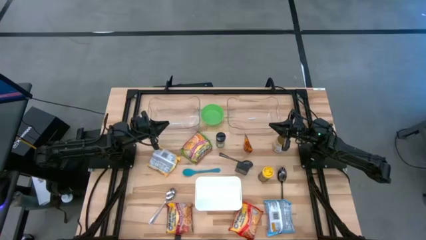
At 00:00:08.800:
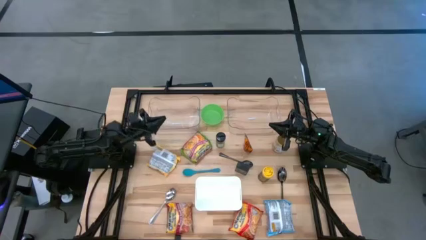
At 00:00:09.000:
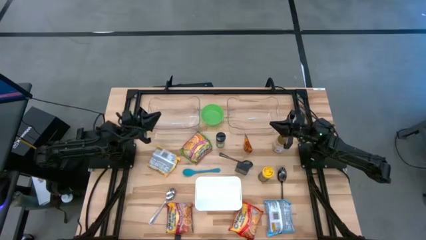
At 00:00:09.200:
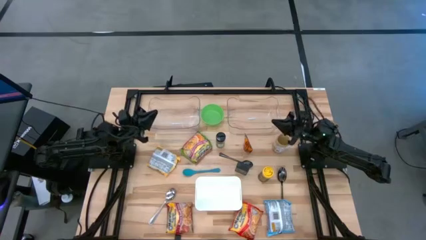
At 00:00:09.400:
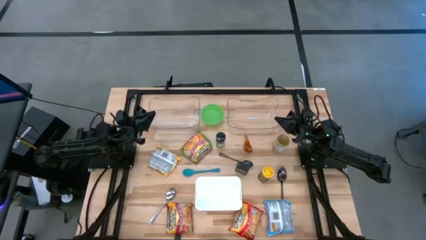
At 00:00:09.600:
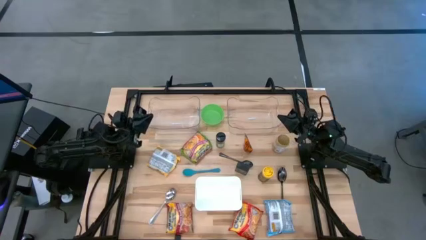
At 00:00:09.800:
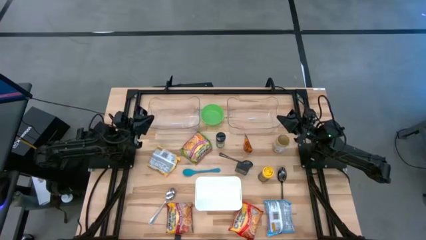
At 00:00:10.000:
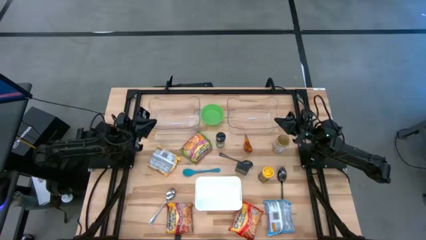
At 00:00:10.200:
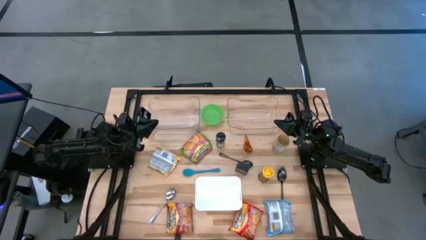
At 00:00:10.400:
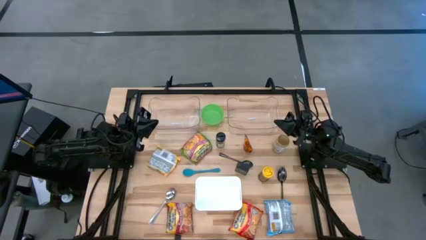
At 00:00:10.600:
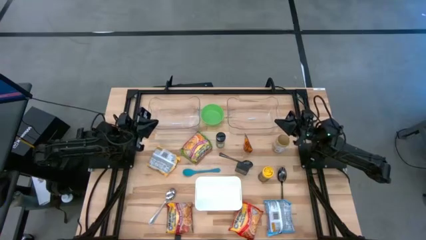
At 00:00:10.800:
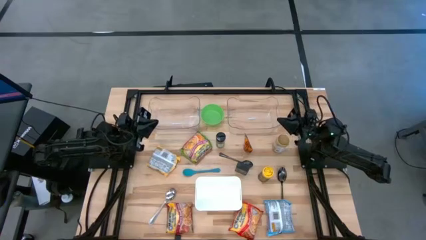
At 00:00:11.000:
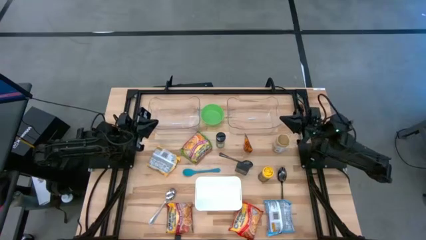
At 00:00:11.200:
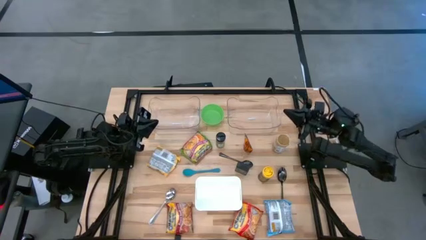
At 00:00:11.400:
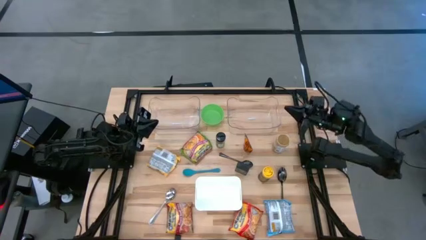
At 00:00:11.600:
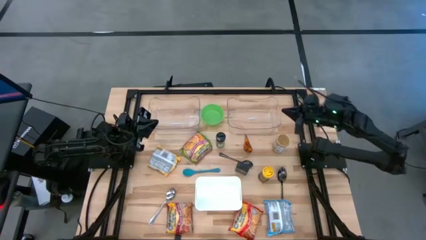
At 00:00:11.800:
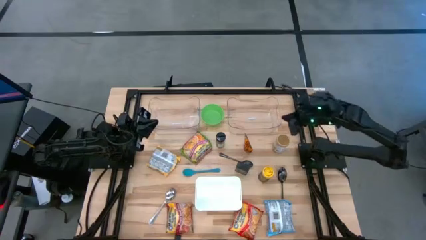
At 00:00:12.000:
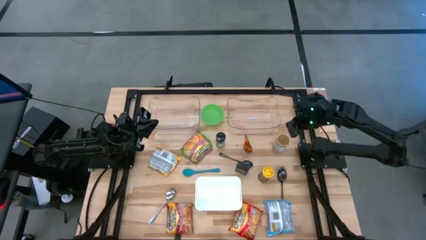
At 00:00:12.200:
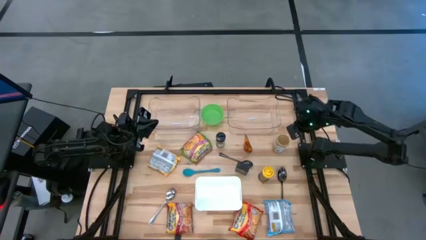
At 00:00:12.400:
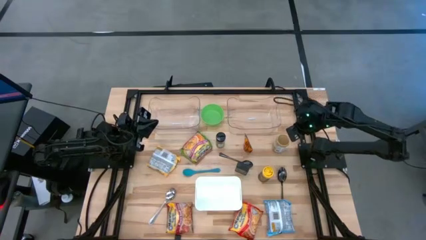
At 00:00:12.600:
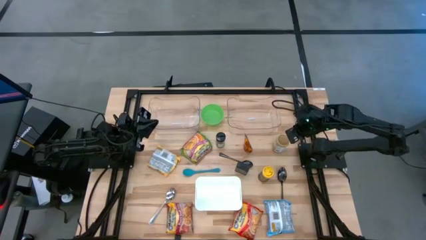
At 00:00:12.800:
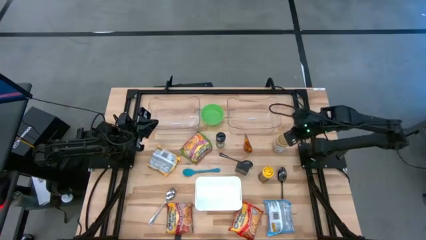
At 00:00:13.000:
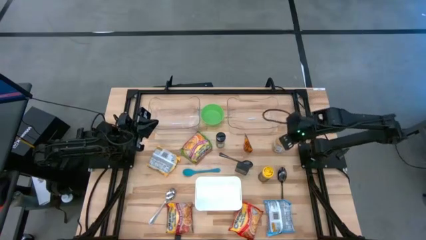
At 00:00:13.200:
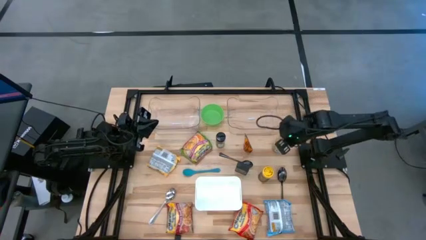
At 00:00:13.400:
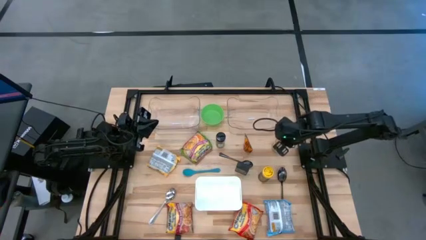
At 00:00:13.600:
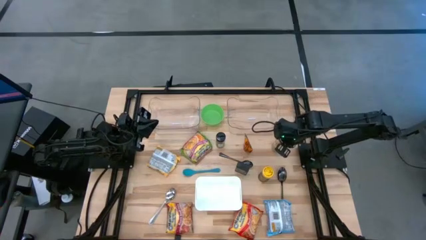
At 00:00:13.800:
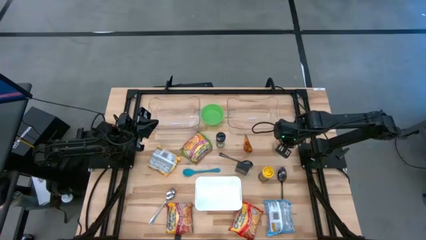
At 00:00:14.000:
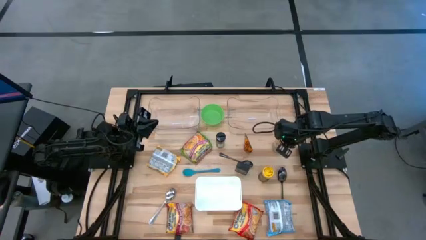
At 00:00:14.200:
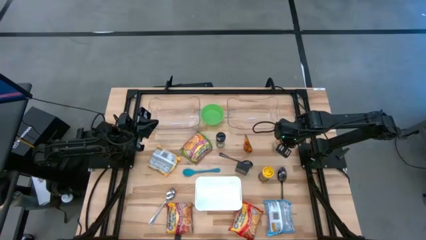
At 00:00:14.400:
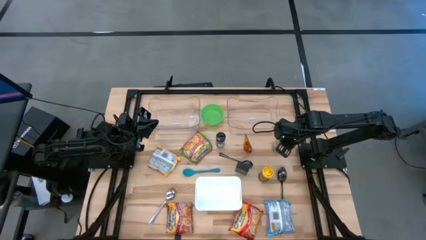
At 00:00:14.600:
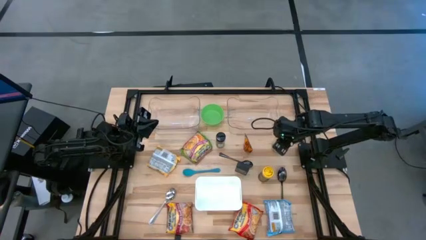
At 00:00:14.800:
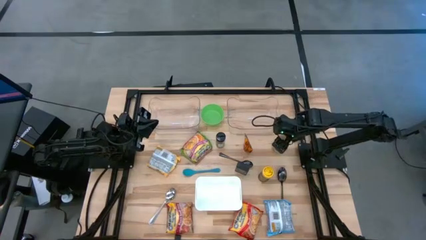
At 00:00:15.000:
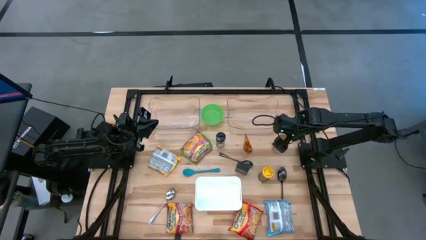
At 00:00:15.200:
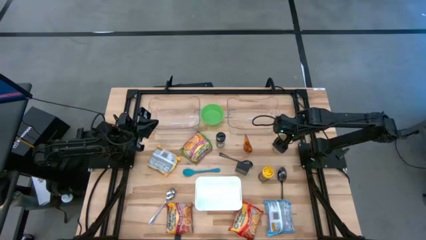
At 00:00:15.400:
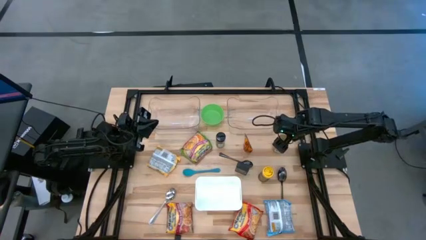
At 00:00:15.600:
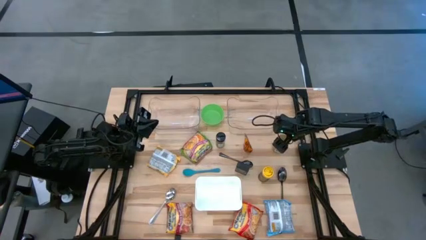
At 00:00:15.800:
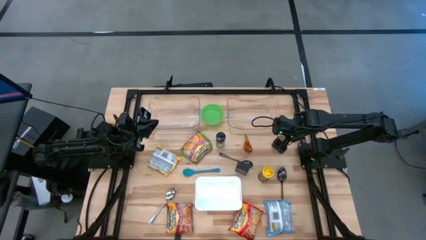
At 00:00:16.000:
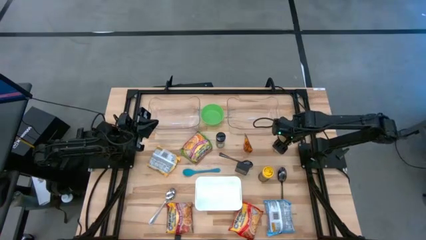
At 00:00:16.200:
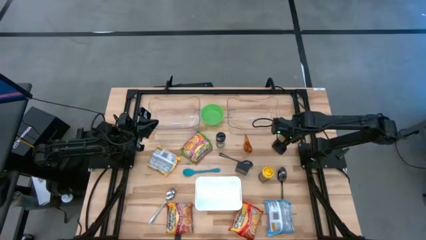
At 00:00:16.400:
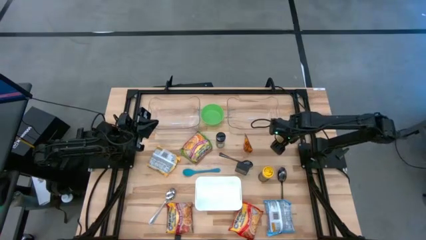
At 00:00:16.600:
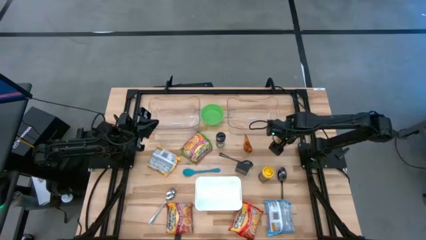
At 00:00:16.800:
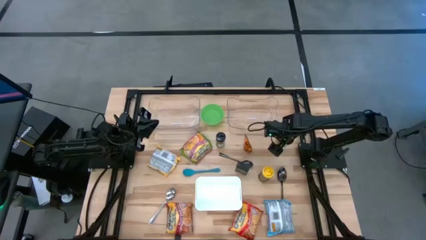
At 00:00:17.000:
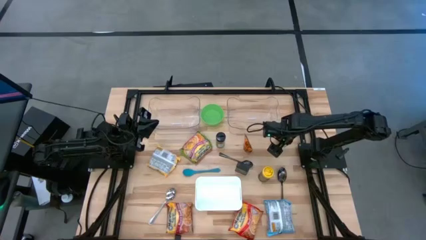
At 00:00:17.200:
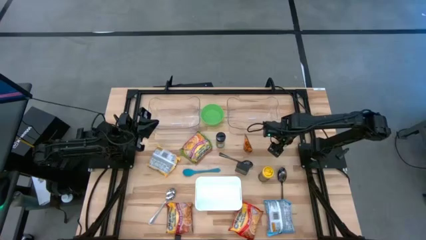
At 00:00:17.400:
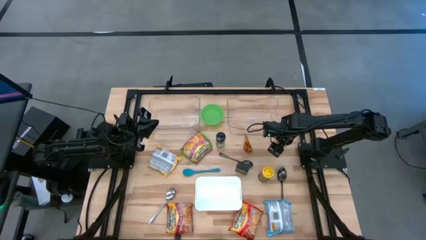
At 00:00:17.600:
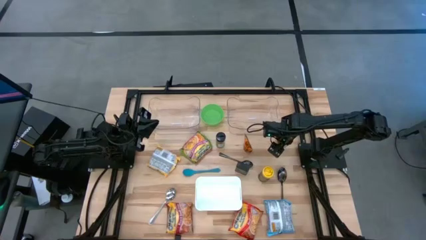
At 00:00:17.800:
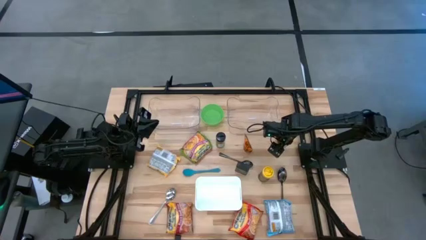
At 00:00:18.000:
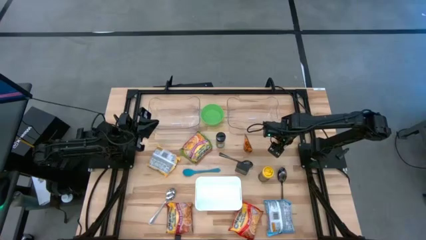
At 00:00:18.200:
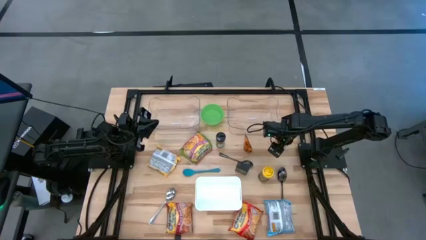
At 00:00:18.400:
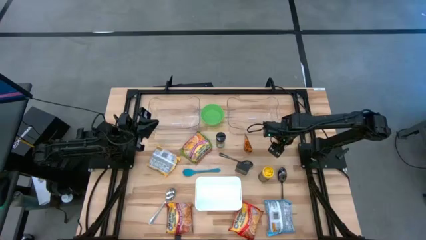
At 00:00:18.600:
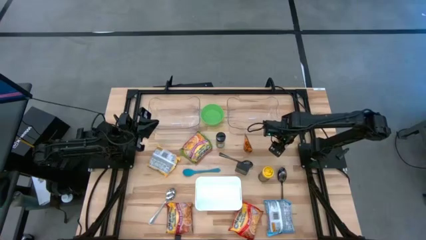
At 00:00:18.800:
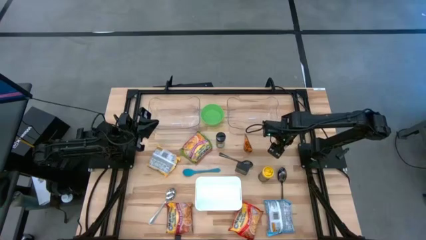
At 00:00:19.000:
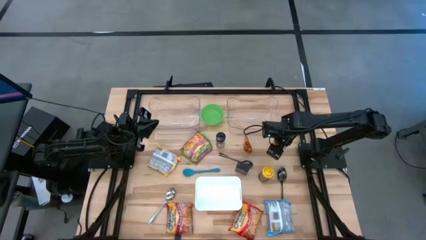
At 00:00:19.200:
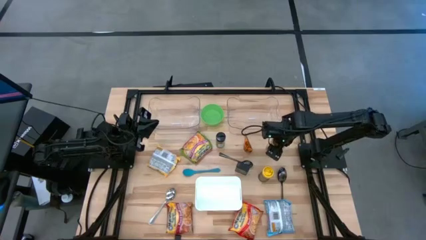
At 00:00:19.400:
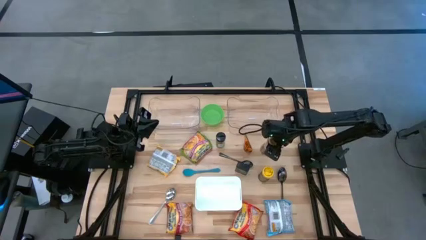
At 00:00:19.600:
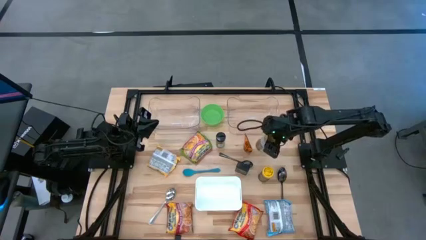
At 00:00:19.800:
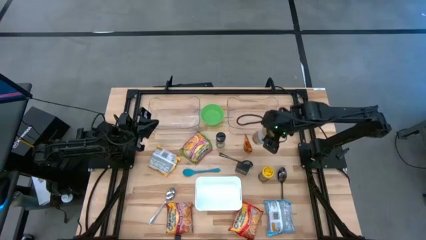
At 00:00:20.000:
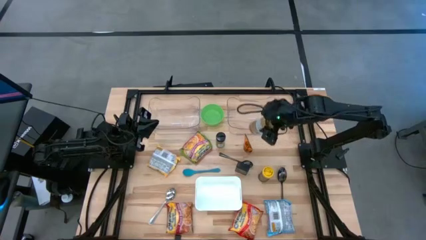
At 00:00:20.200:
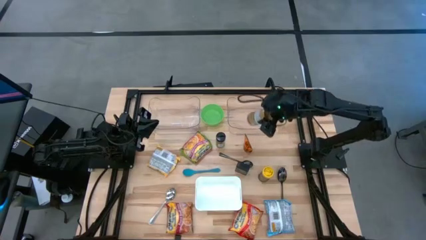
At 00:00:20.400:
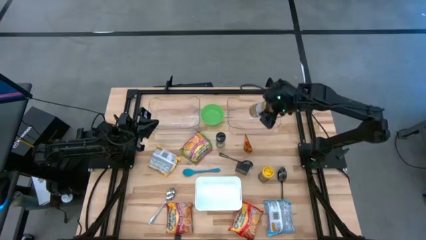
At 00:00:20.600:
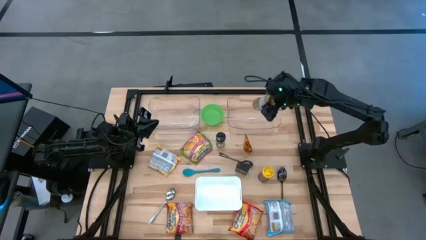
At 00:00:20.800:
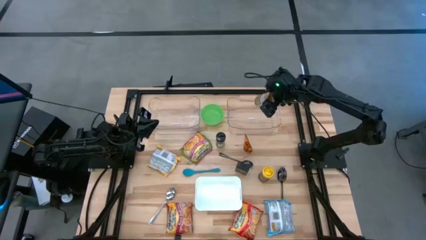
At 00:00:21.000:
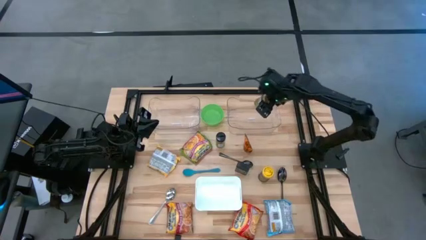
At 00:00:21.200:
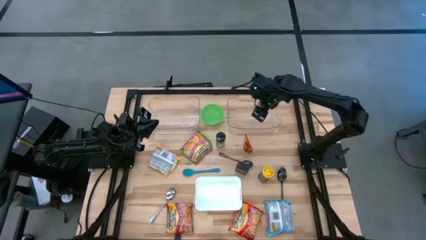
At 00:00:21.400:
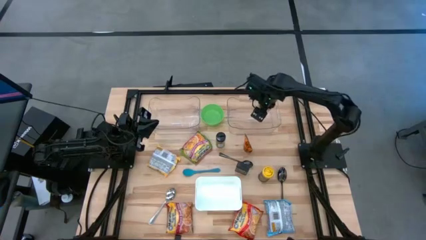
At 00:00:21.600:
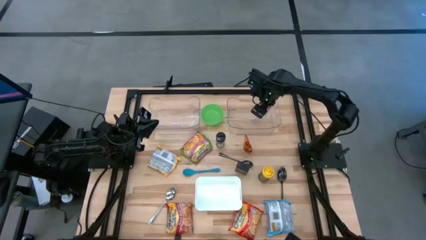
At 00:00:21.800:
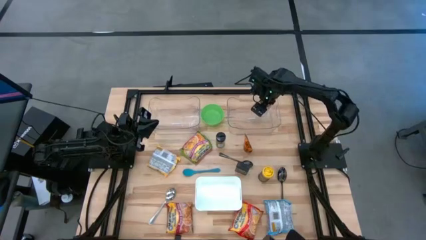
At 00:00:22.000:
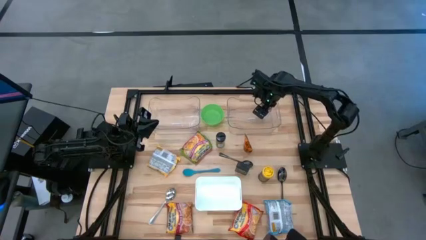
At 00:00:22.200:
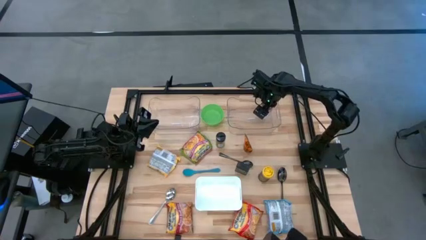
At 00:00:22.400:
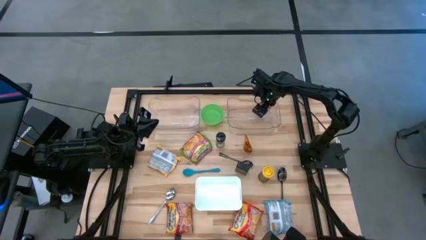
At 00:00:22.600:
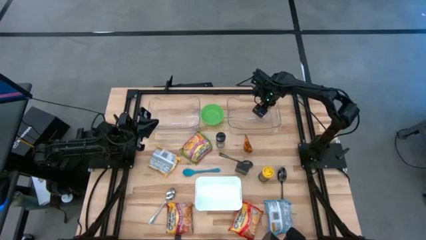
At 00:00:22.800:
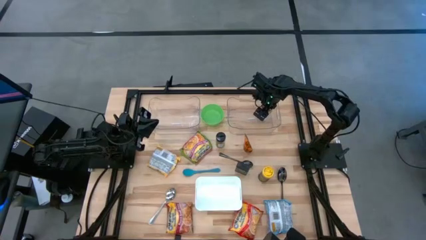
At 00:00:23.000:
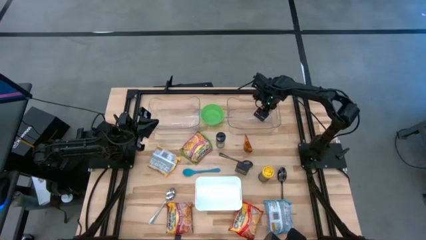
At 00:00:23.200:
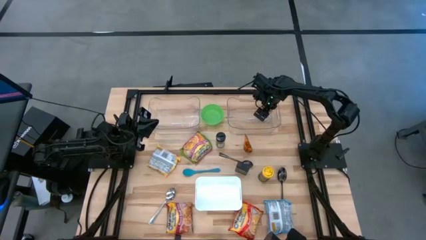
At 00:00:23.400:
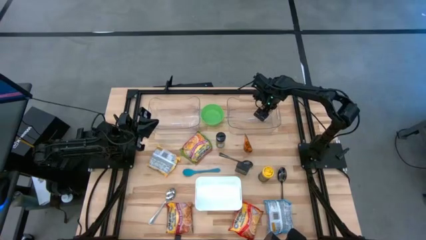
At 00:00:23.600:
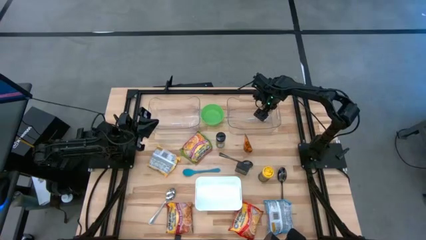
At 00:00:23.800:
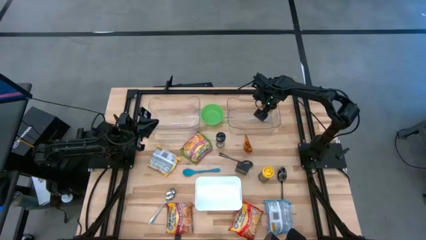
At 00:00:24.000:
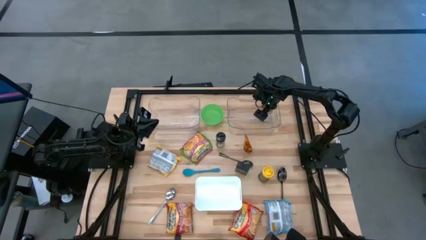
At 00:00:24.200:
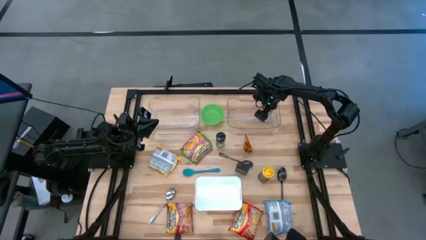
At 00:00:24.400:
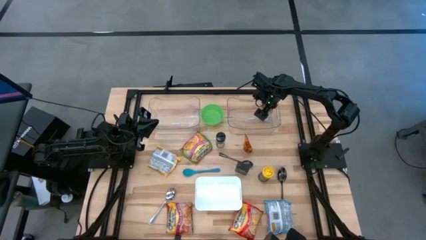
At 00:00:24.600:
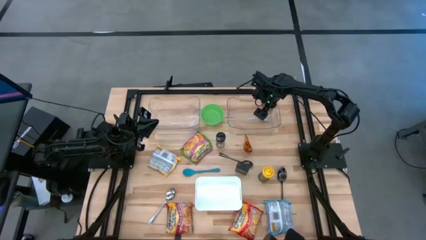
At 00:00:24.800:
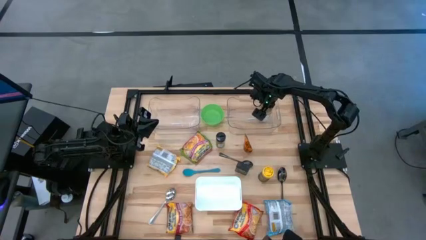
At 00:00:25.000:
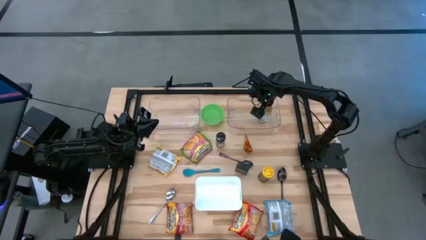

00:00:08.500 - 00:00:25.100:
Task: Pick & Place Food Item
Put the golden seasoning into the right transparent bin
